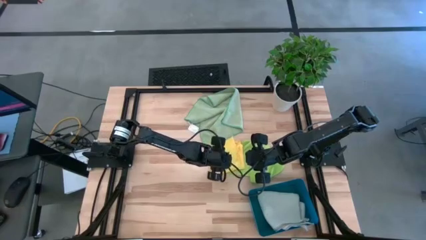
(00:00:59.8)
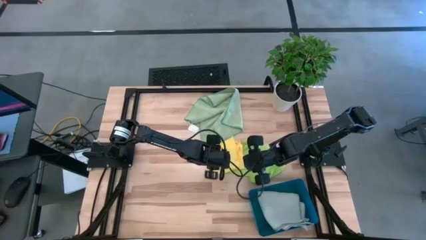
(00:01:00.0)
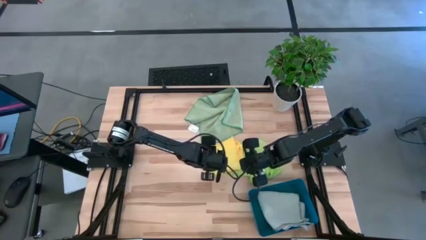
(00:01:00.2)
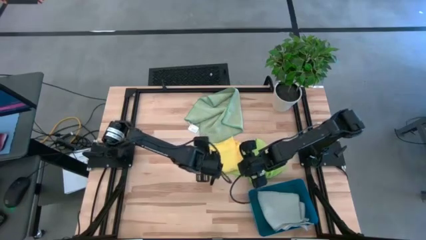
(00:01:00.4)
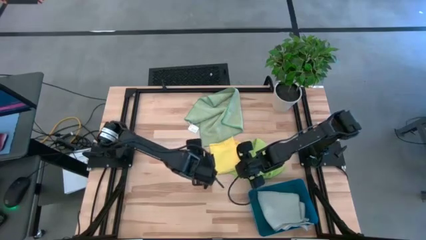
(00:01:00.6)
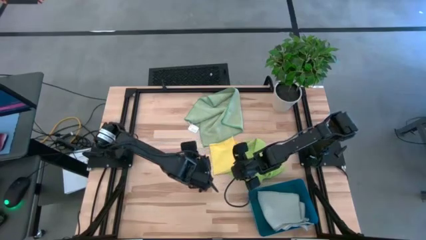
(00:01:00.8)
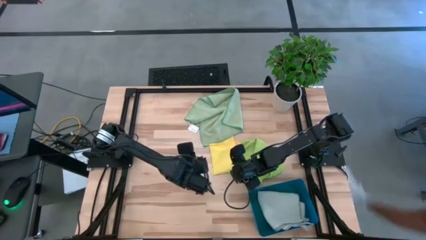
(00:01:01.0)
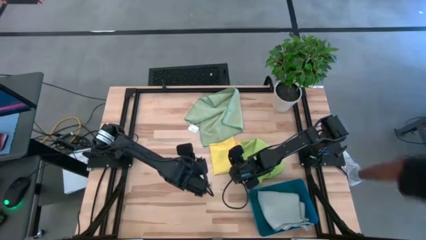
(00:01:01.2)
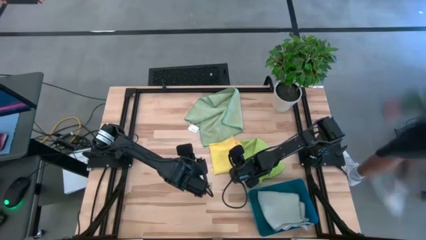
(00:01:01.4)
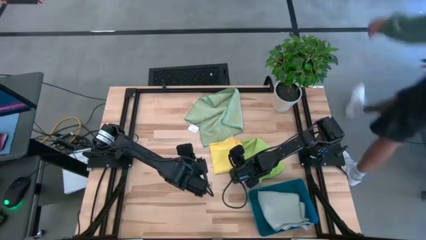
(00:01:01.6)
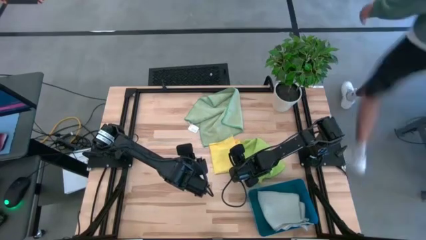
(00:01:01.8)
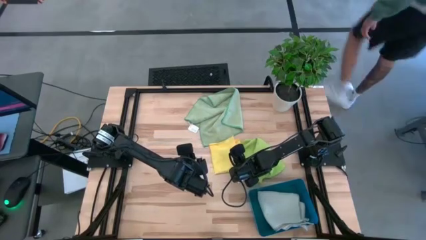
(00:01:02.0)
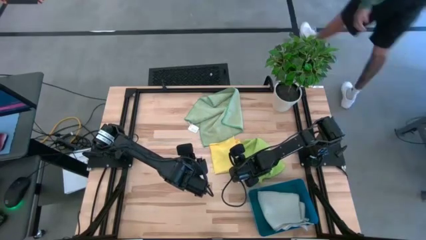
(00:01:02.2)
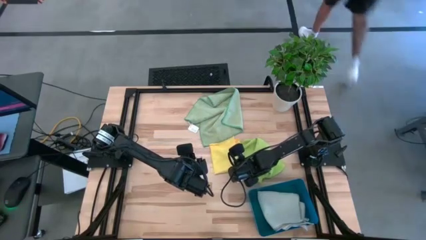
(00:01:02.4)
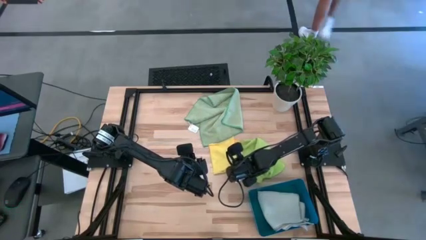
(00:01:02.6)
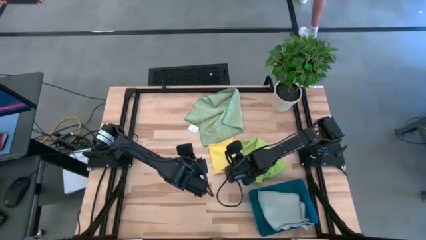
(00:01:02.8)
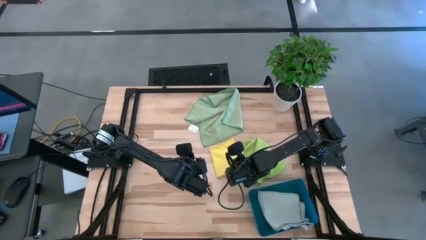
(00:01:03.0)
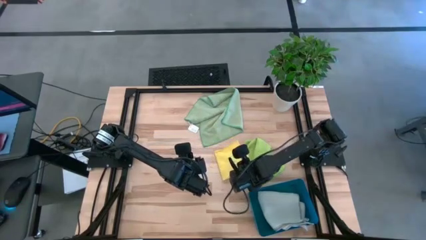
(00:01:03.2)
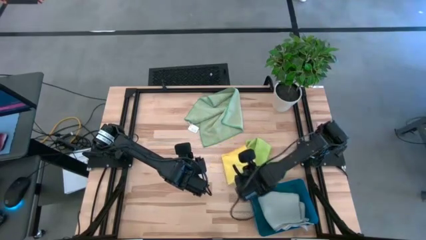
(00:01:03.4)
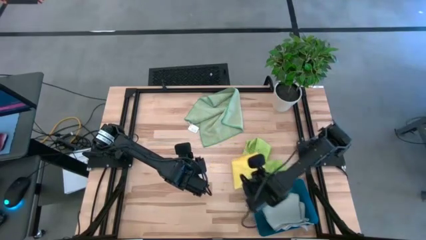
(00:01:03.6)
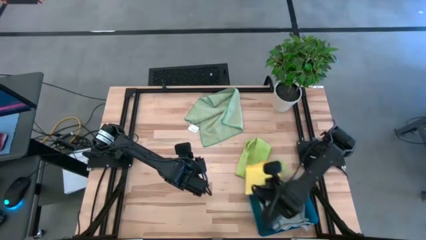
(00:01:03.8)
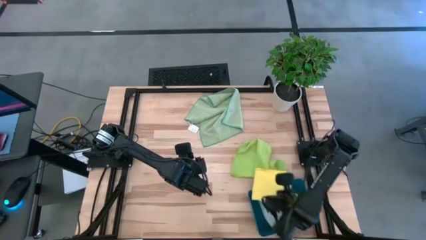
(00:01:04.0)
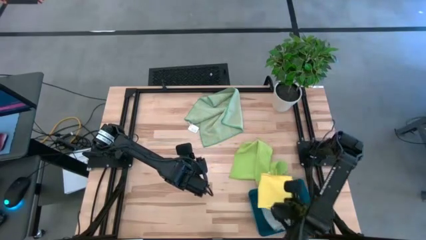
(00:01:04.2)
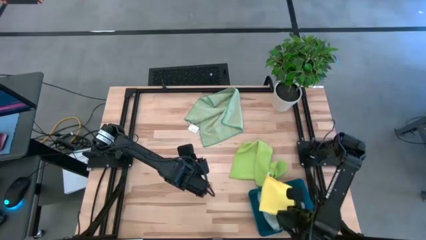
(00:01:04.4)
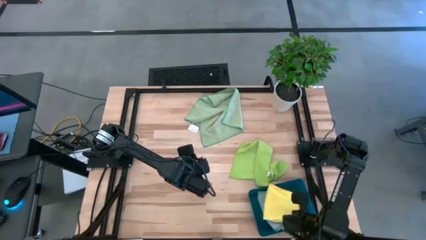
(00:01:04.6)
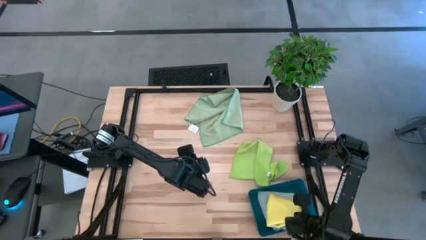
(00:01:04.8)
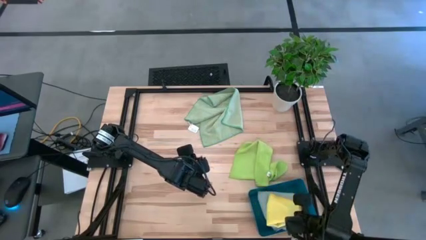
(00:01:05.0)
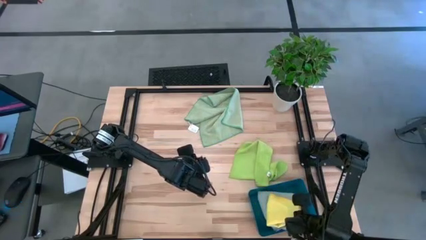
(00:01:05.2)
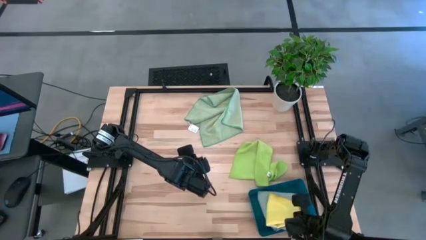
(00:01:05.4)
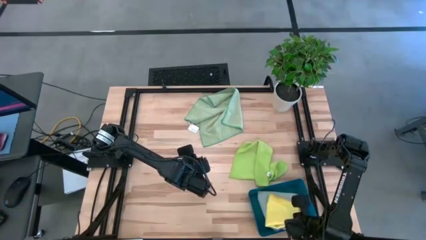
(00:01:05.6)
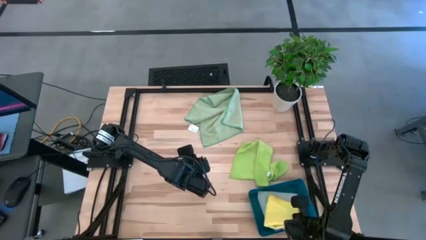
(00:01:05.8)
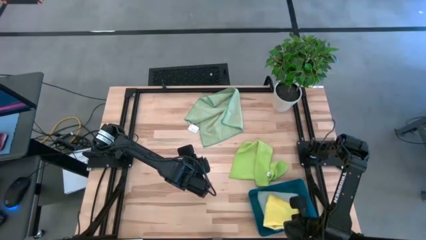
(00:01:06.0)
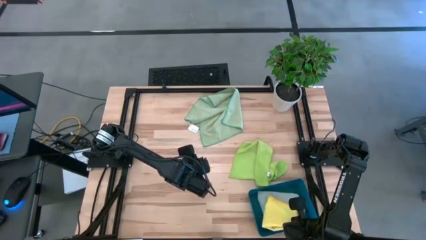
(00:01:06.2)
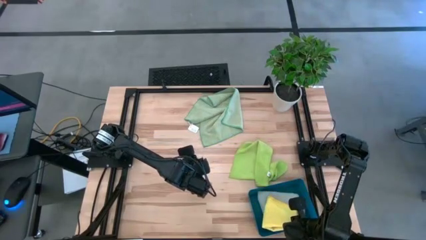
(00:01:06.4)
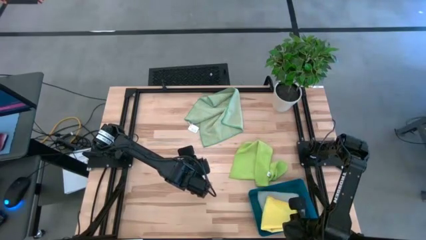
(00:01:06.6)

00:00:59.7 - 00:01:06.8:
Task: Fold microfiber towels
Put the yellow towel in the bin

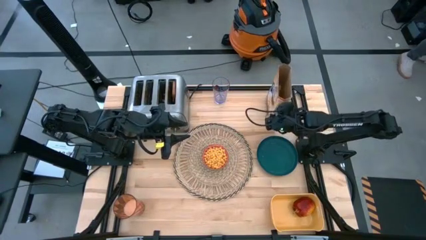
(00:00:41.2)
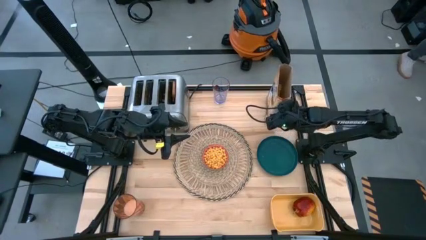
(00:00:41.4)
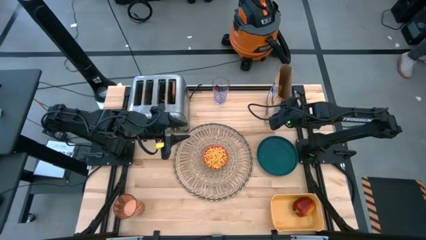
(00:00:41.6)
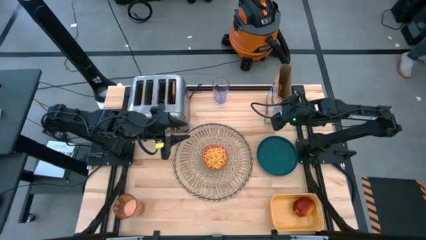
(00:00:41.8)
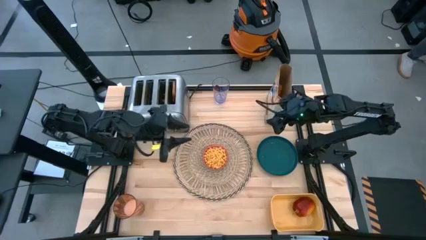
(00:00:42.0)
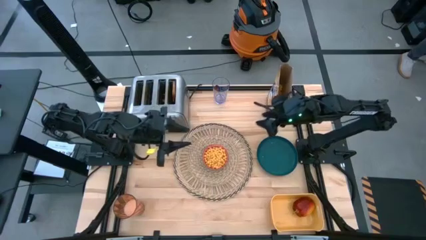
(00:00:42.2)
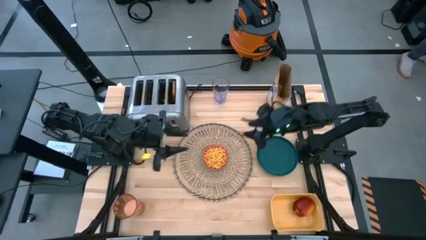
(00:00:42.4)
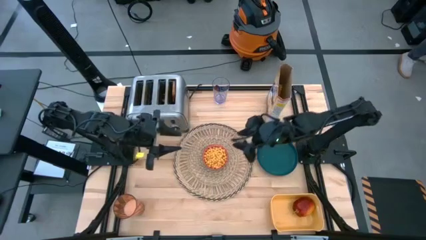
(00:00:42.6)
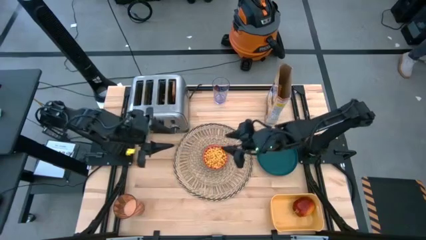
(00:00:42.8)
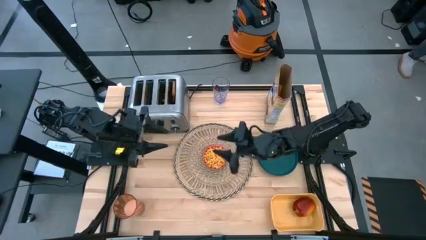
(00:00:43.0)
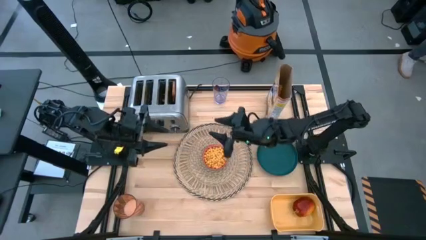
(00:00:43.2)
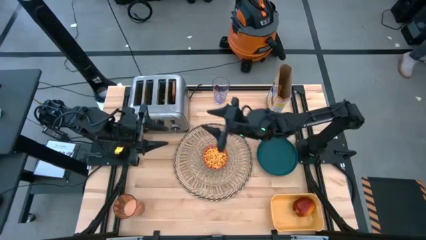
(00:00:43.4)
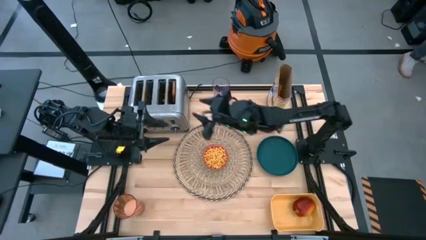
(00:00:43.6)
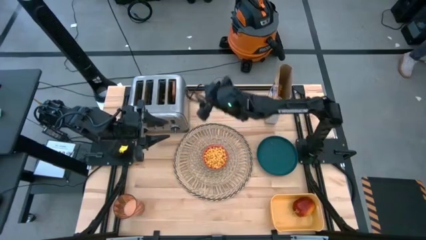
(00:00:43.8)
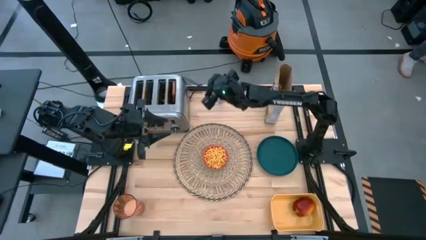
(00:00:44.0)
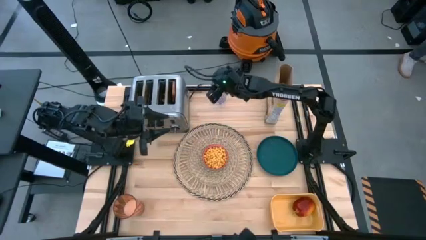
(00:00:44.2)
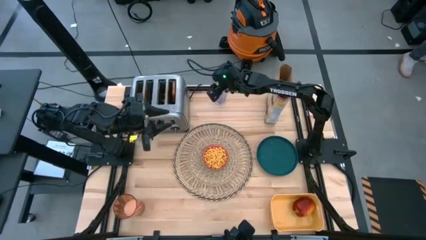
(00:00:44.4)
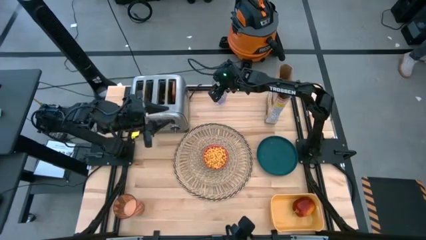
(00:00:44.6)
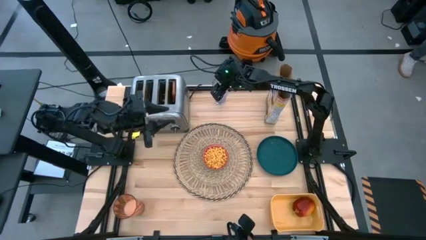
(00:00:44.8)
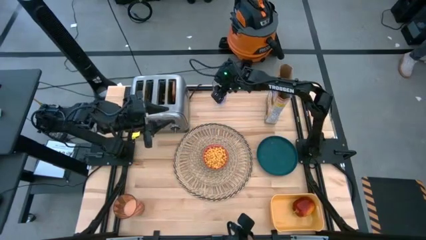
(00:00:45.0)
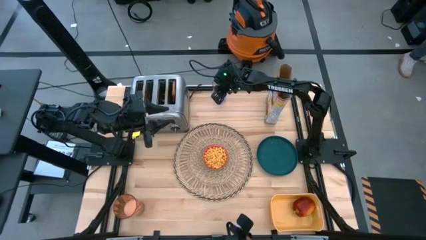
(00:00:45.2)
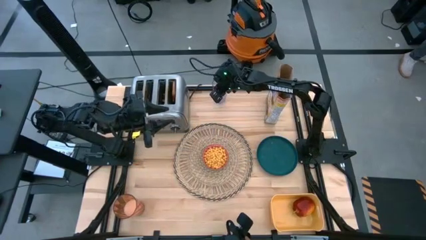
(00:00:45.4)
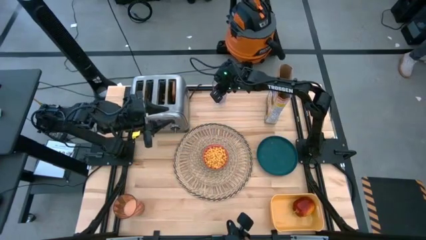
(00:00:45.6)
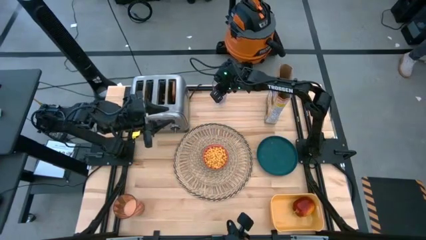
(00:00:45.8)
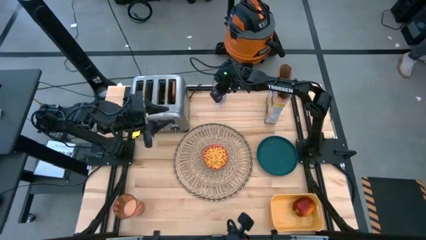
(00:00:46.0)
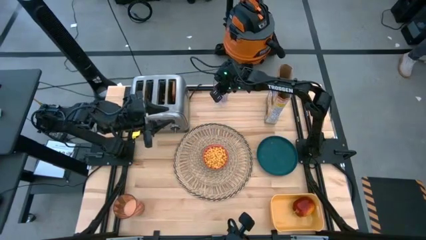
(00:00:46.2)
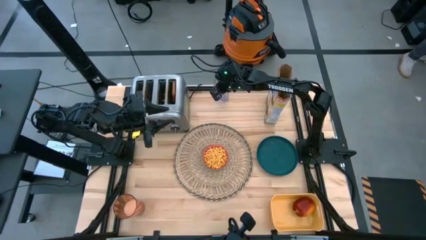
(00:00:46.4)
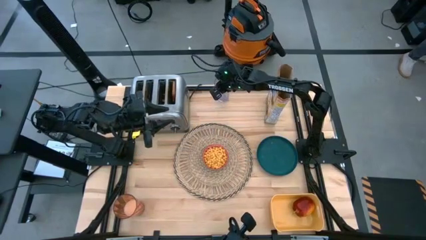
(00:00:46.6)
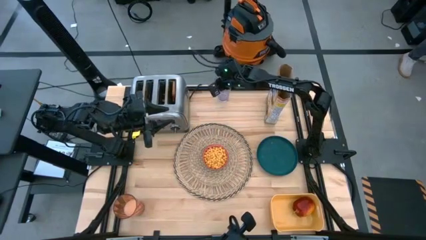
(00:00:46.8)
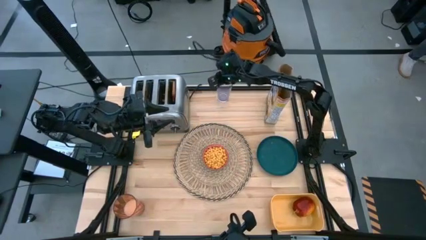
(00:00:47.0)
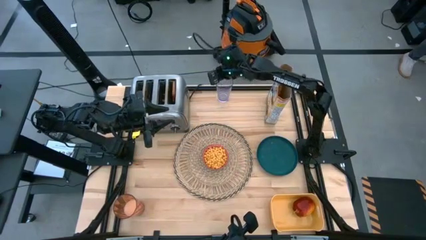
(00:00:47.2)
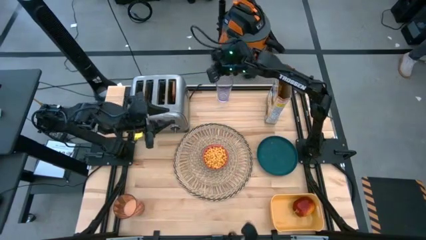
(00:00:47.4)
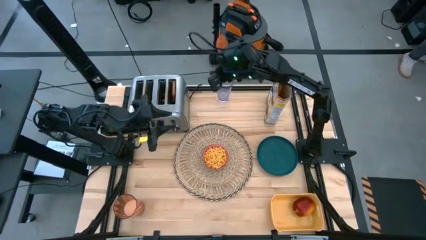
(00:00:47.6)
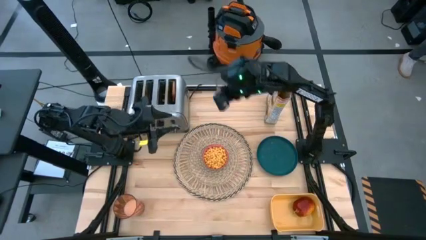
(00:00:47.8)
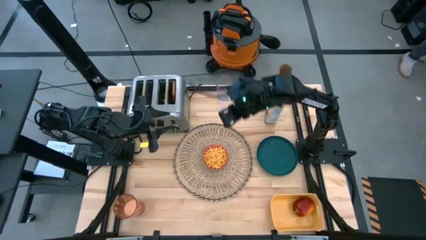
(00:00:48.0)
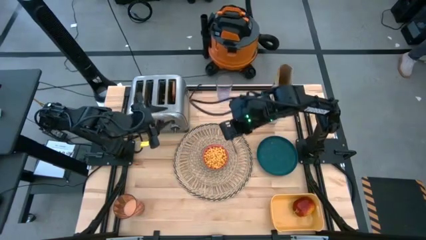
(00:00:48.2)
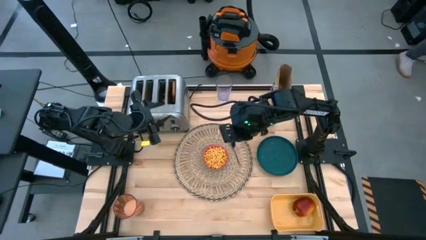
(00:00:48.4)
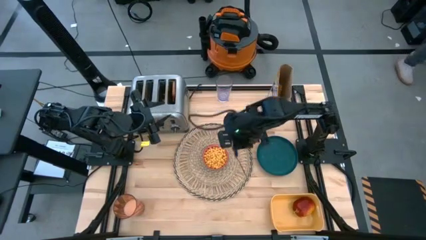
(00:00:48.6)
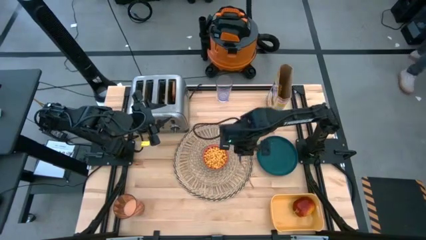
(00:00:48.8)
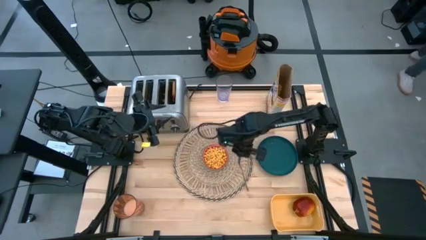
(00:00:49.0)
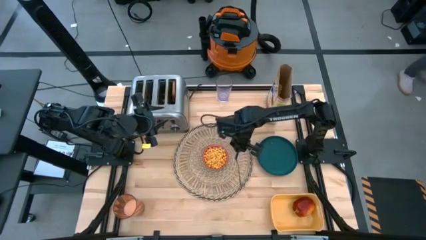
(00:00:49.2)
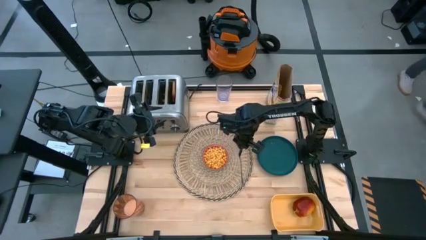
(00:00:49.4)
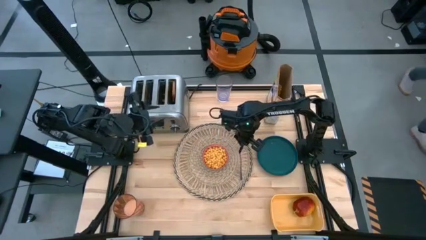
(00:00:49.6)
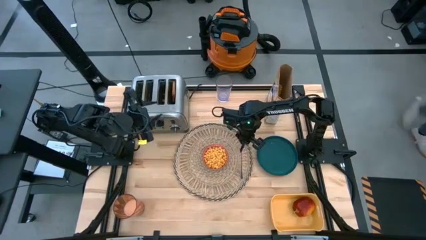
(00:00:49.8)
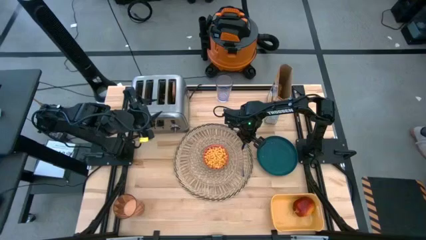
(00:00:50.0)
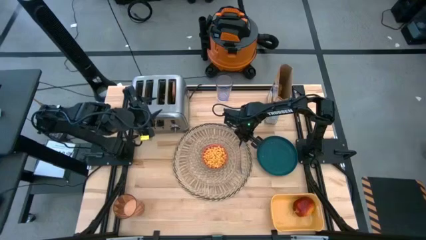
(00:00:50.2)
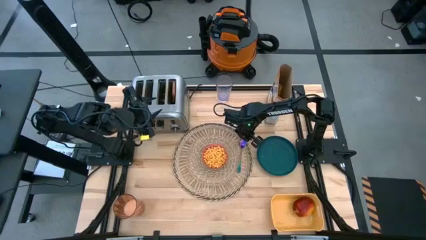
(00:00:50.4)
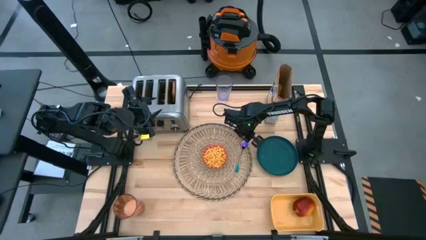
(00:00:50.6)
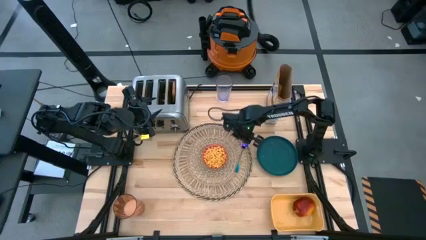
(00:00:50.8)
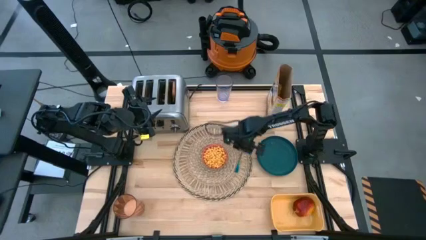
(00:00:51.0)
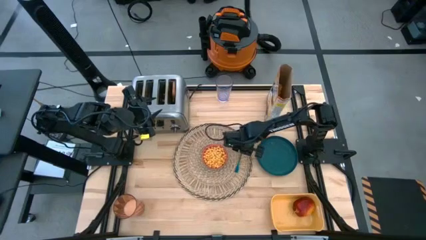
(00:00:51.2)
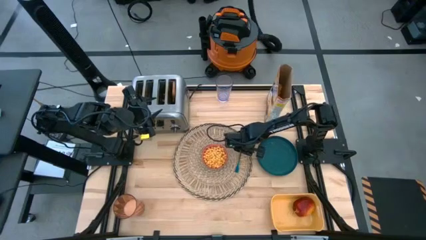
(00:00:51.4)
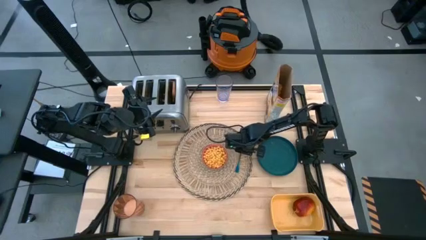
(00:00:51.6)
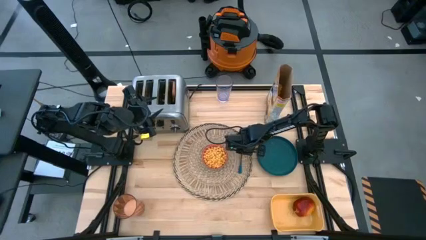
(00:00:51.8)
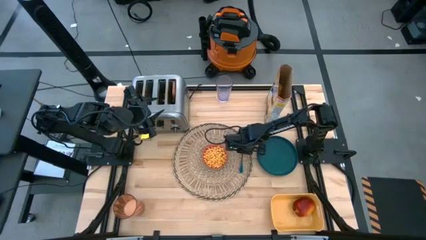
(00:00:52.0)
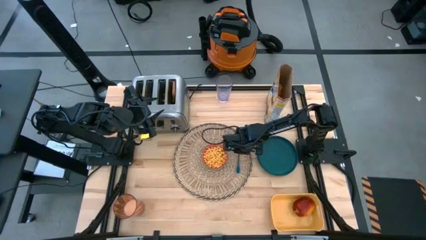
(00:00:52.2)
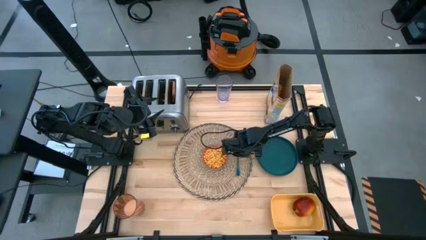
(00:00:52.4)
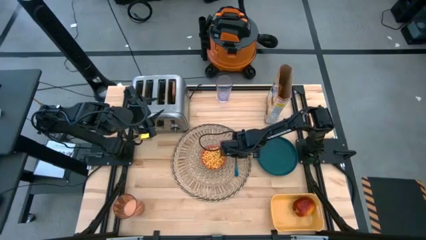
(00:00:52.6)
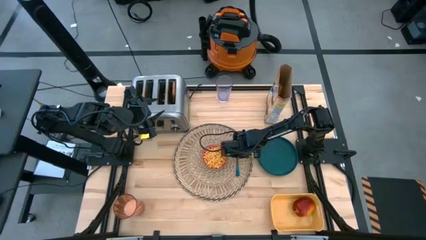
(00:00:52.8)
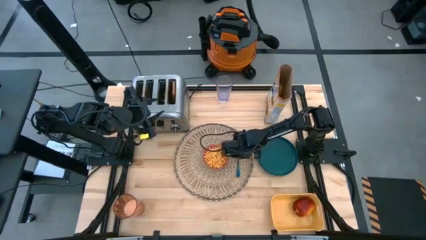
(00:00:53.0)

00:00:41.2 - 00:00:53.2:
Task: Arrange a breakfast setting
Put the blue spoon to the right of the red bowl
